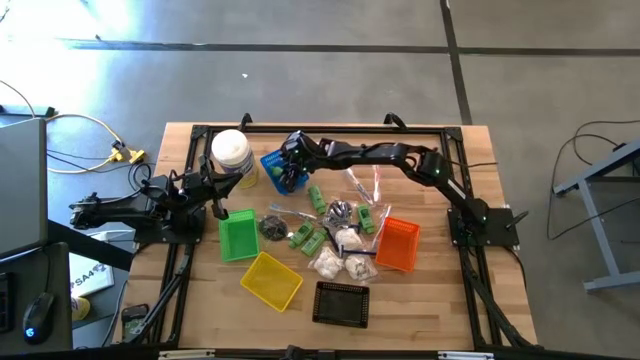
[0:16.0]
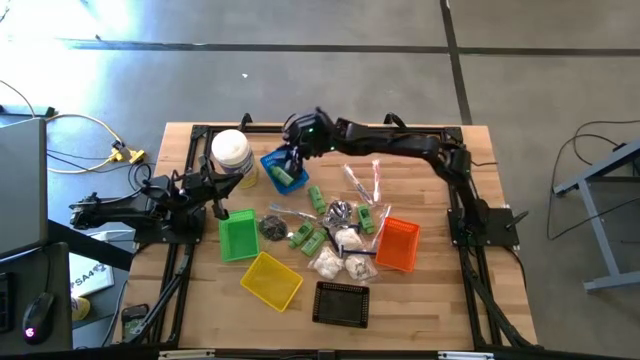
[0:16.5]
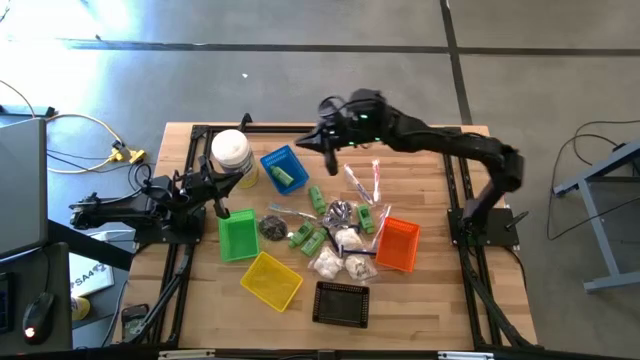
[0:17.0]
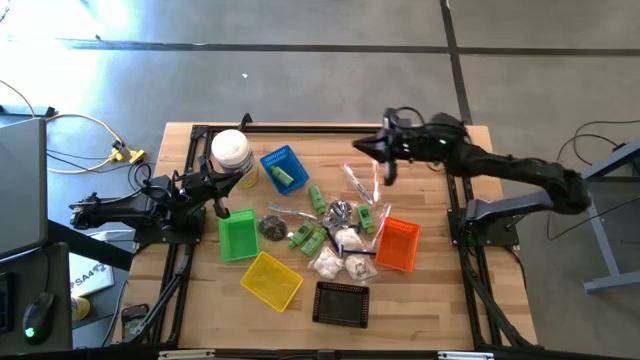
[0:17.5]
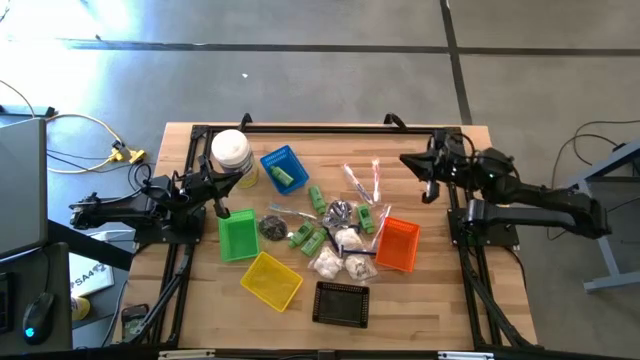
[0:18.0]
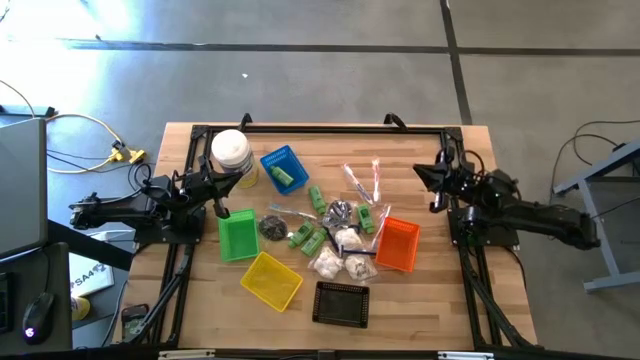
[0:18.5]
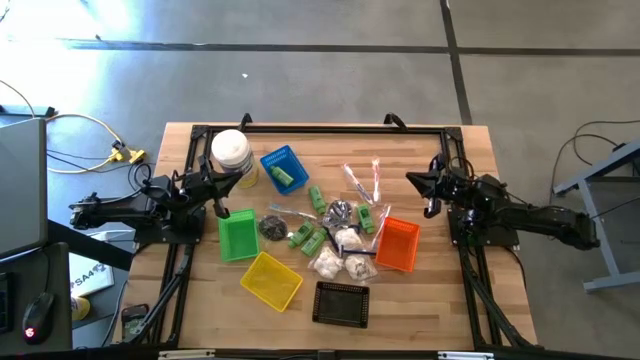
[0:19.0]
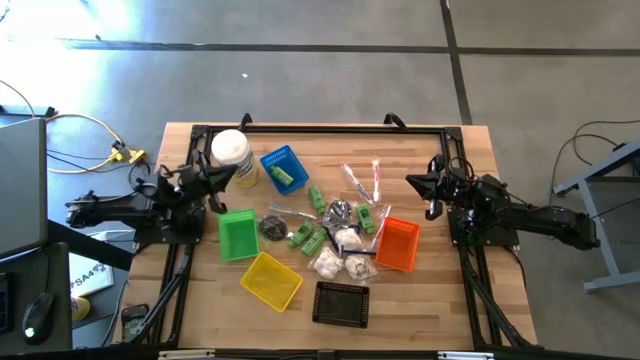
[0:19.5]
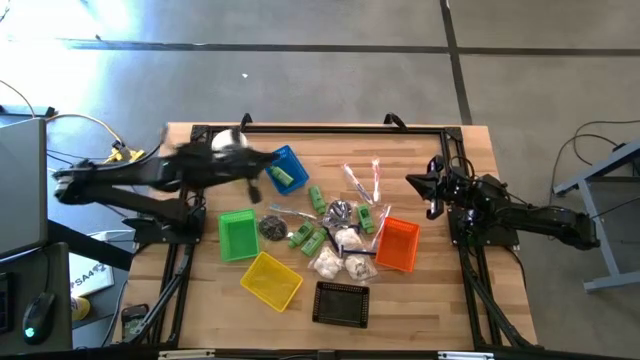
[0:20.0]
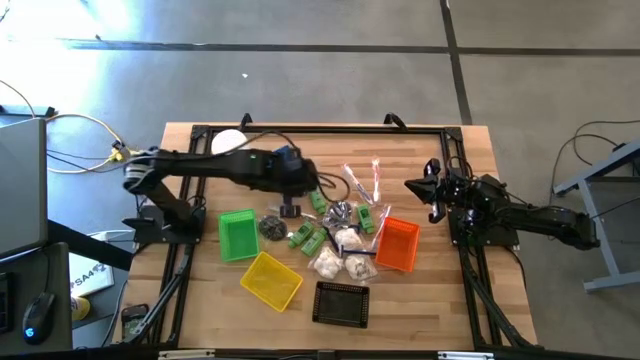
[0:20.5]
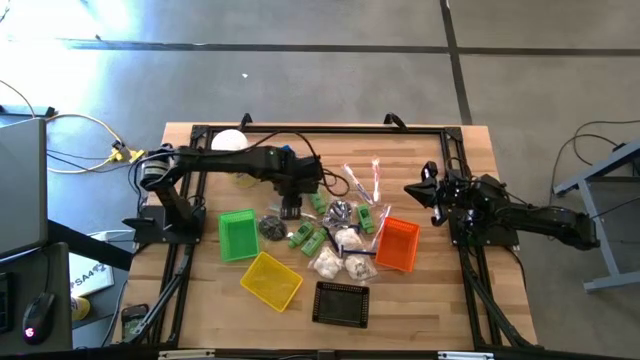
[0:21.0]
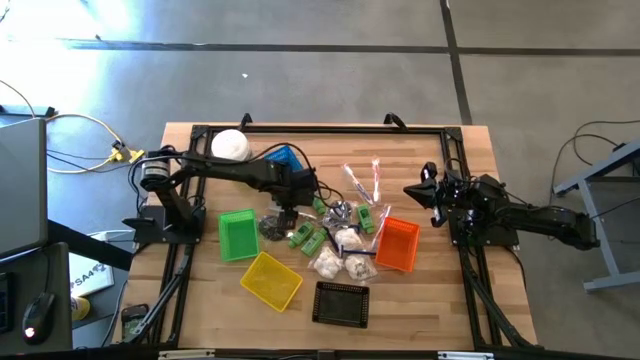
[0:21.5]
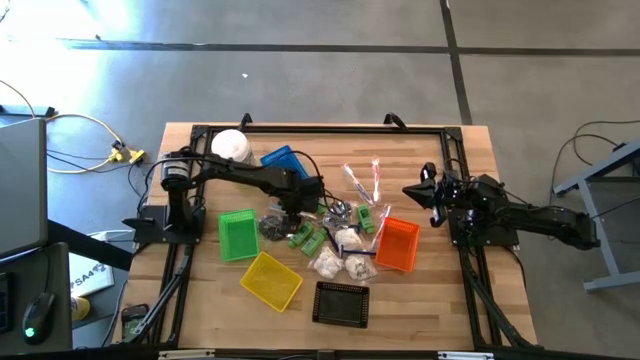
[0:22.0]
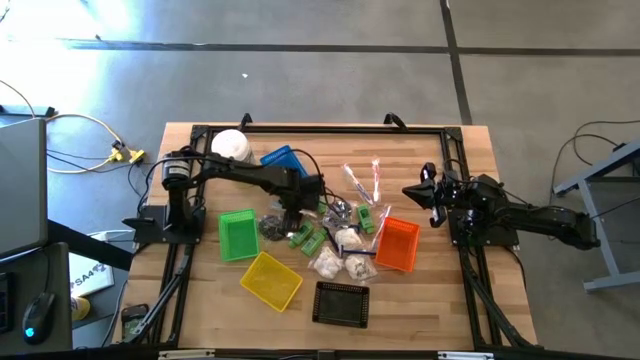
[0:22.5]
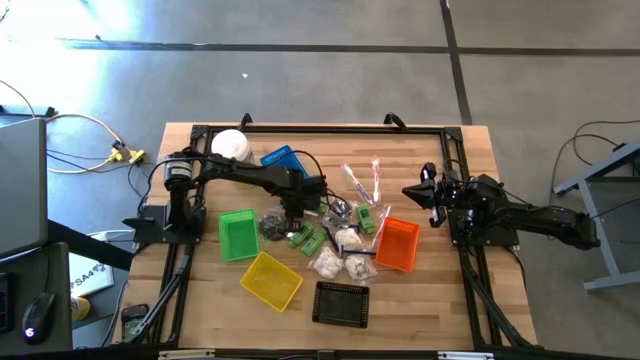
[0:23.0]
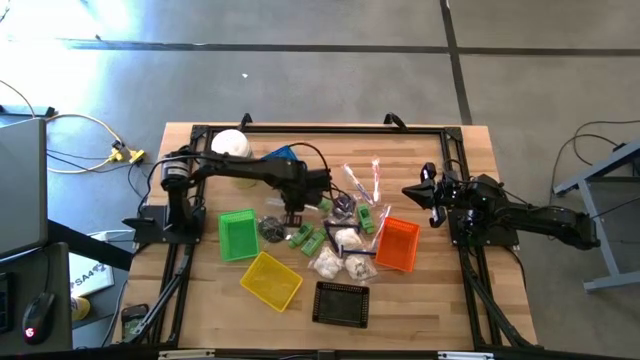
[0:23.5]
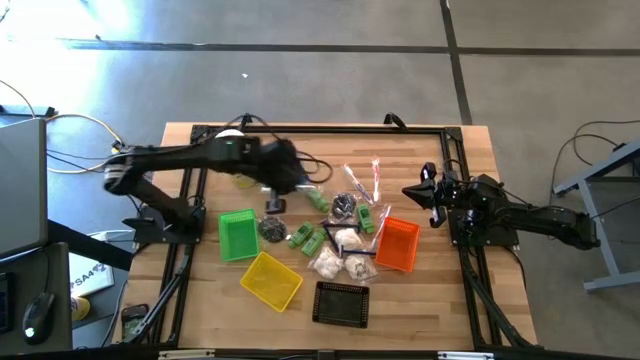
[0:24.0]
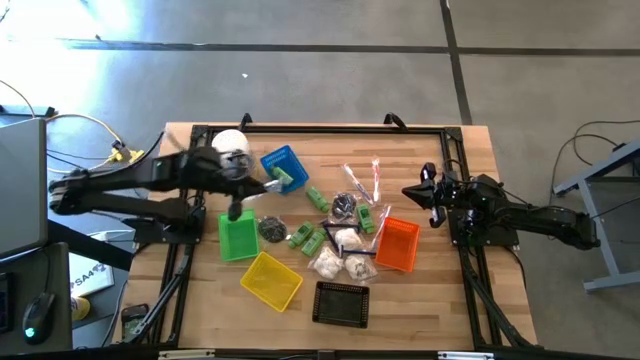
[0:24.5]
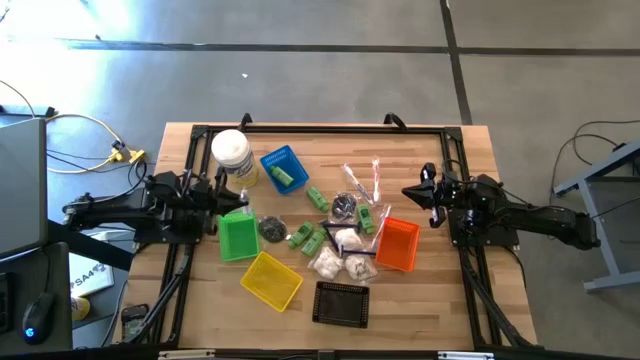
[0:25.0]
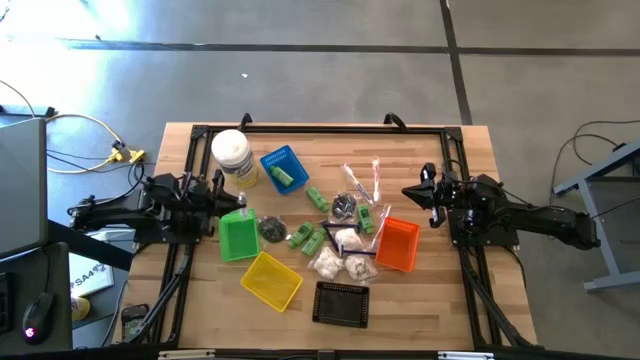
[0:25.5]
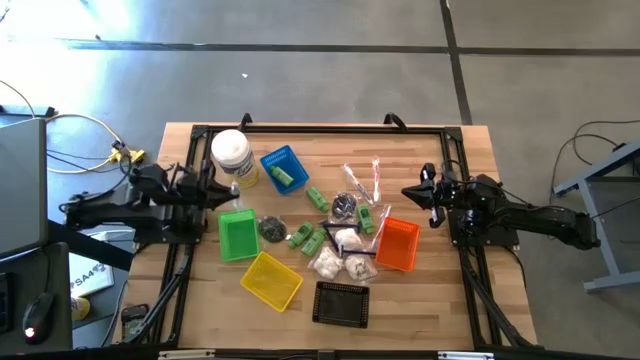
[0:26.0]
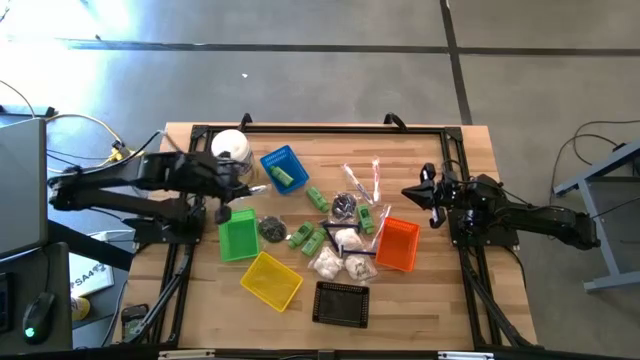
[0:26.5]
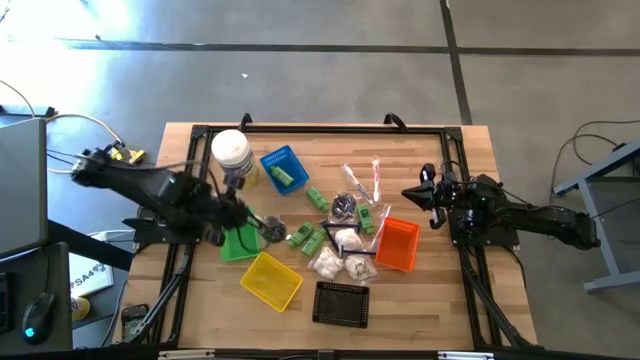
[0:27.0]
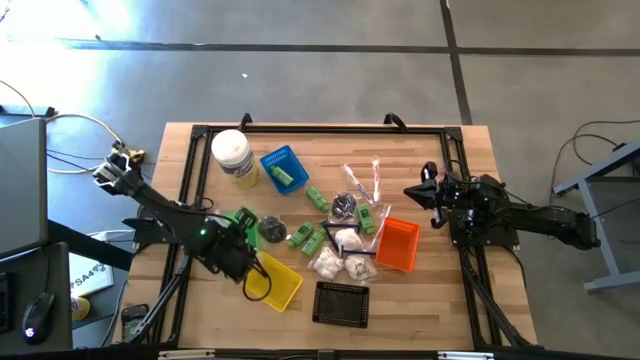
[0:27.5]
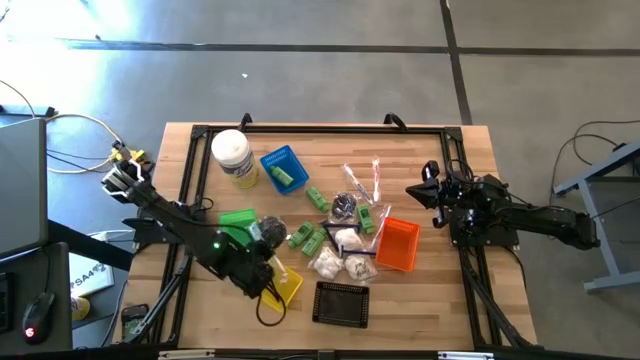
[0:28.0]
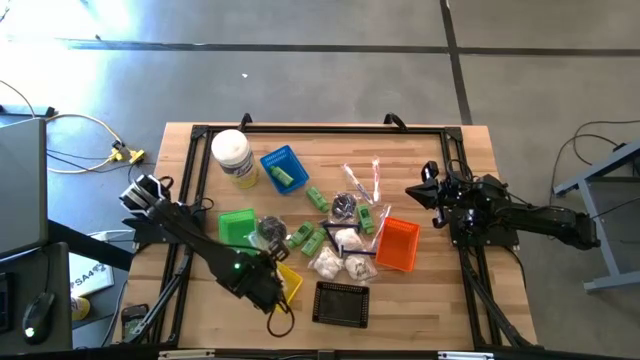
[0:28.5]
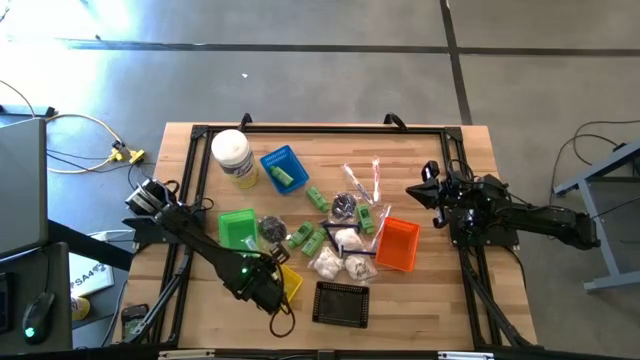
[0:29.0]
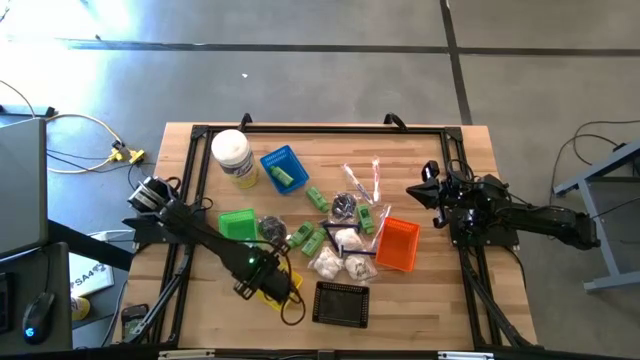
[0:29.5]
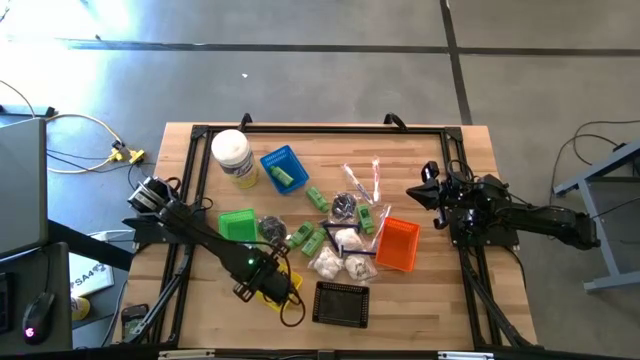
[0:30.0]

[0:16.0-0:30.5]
Task: Pick & Place Travel size toiletries
Put the blue toothbrush into the yellow bin

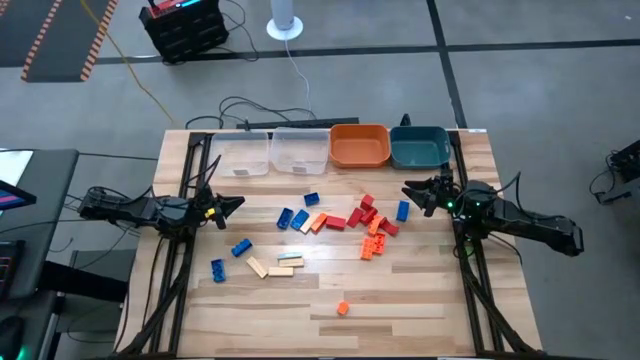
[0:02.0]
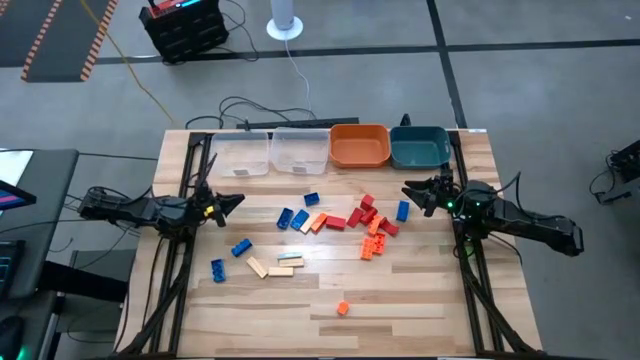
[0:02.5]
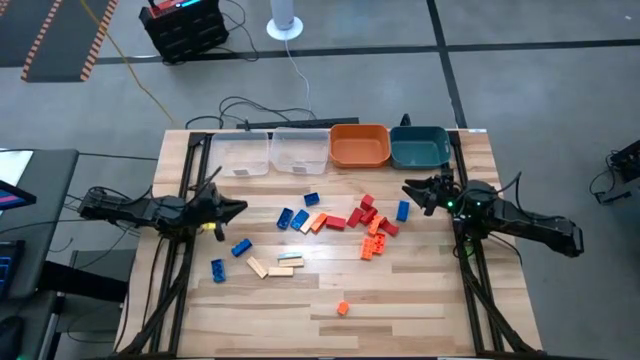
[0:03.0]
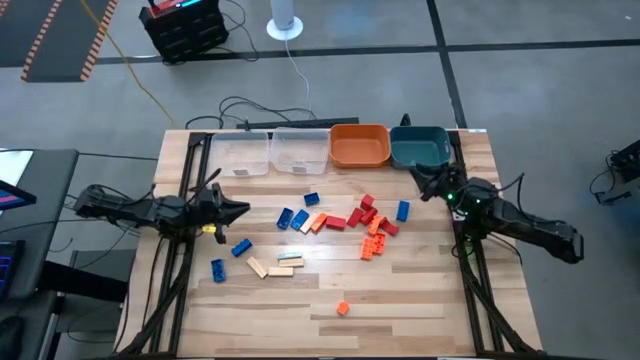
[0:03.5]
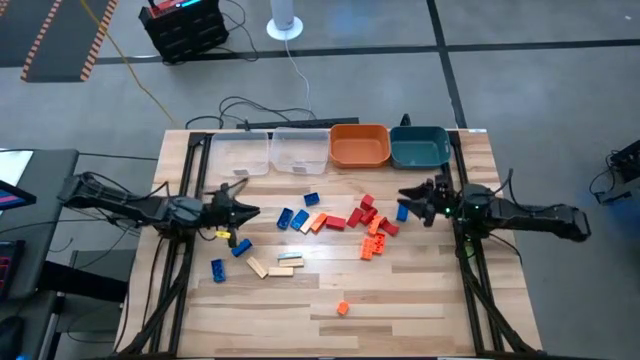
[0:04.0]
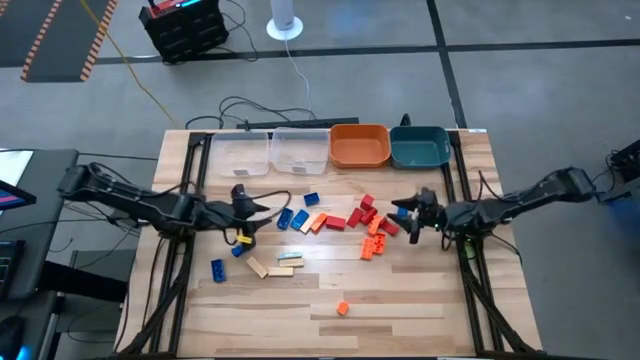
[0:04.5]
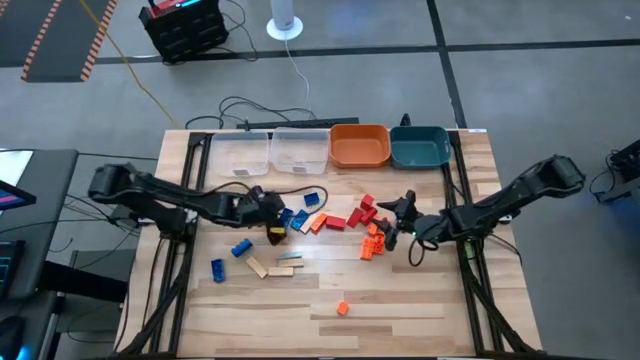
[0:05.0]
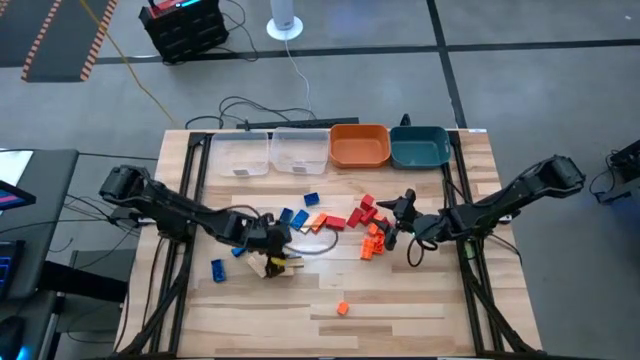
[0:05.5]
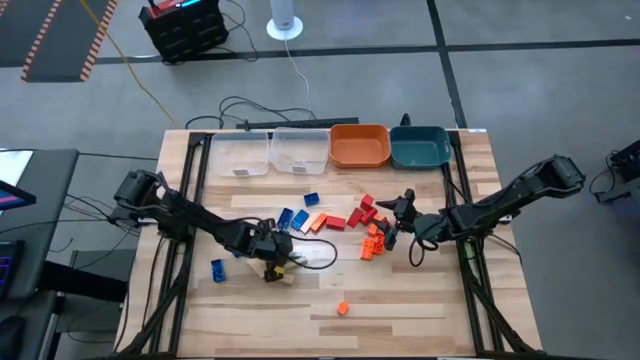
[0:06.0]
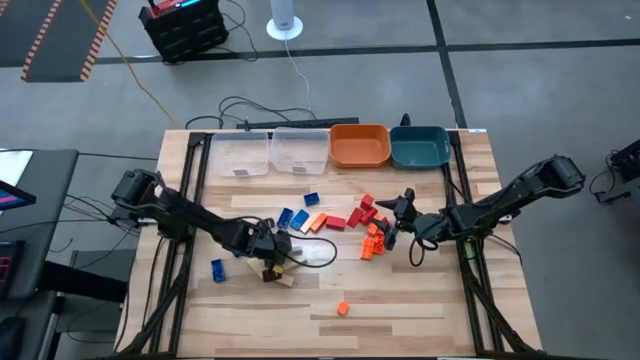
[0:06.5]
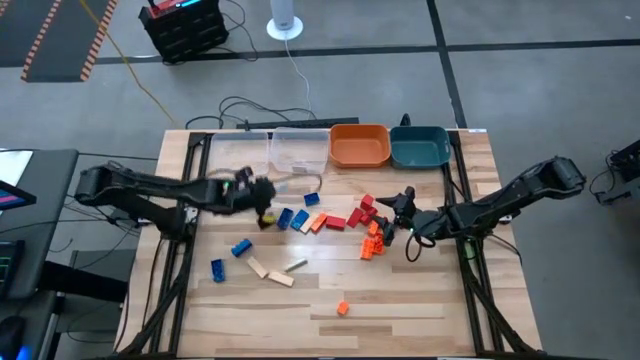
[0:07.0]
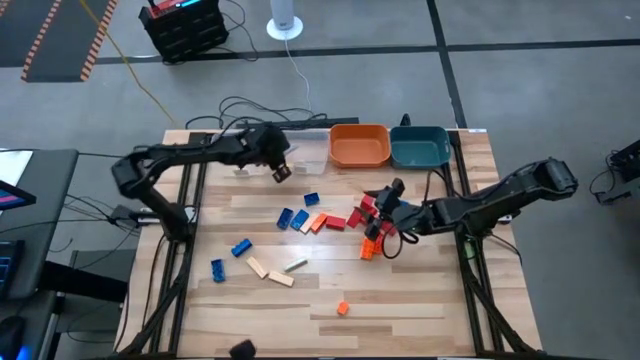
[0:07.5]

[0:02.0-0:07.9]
Task: Sort blocks
Put the brown block into the right transparent bin

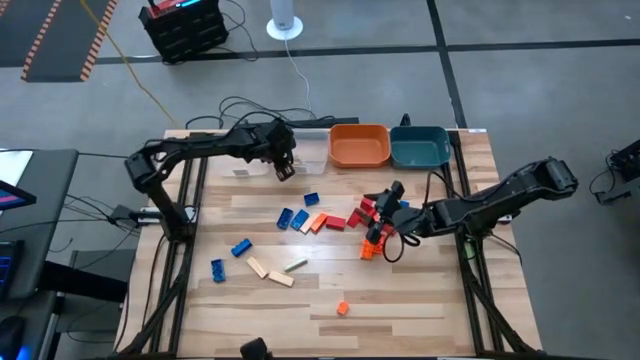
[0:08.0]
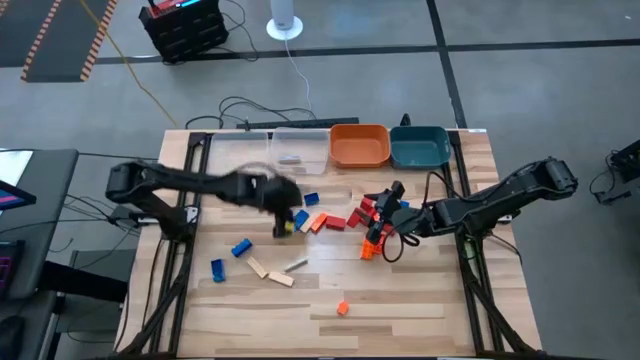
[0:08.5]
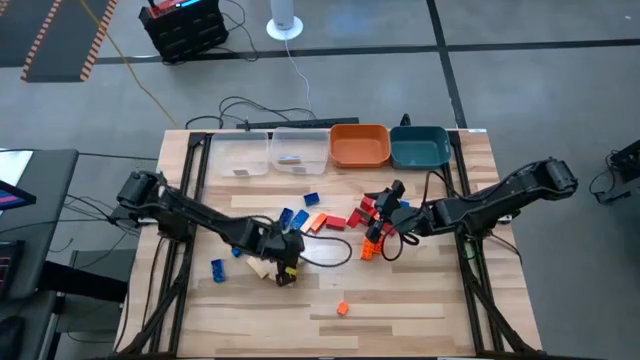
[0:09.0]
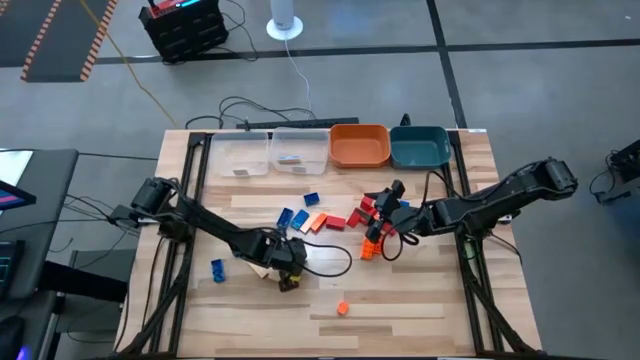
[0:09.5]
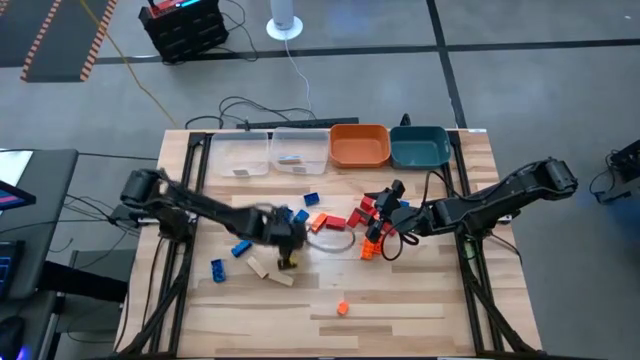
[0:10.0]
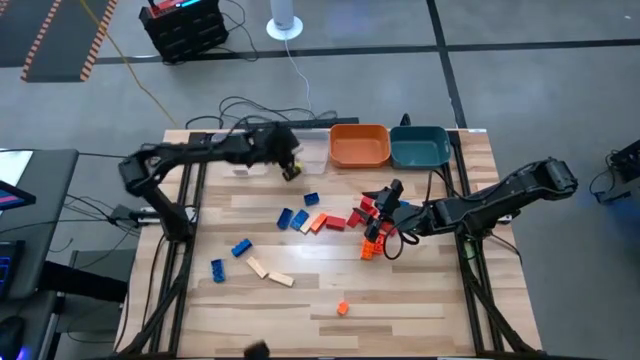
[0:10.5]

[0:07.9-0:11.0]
Put the brown block into the right transparent bin
